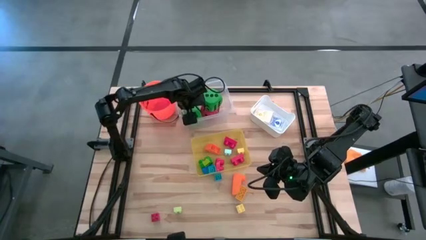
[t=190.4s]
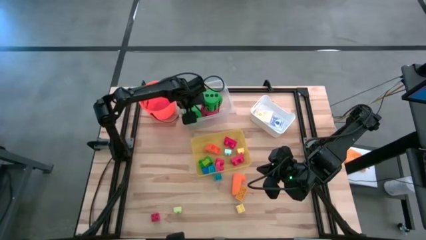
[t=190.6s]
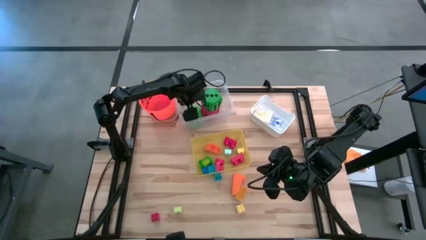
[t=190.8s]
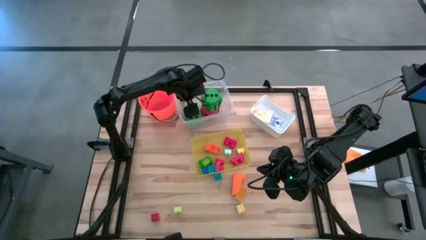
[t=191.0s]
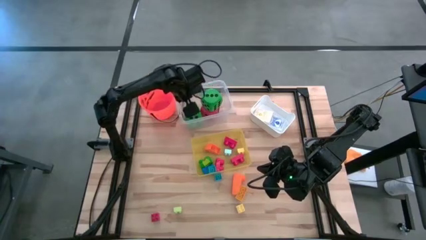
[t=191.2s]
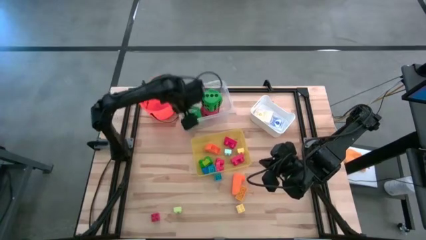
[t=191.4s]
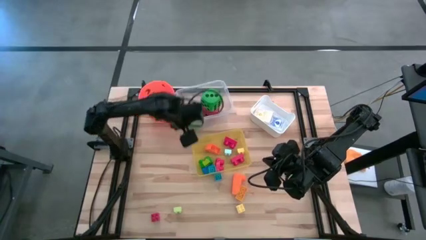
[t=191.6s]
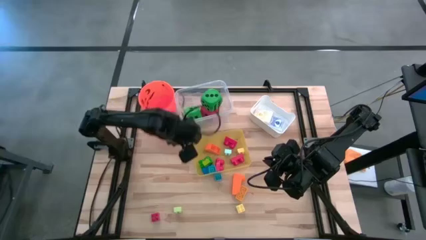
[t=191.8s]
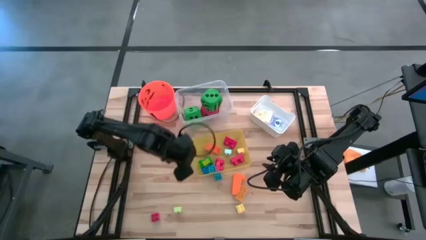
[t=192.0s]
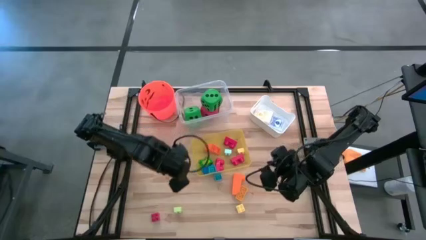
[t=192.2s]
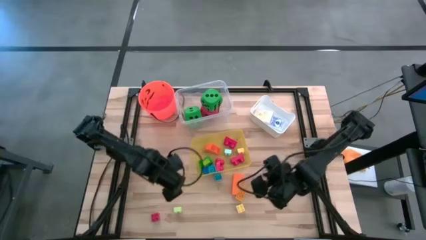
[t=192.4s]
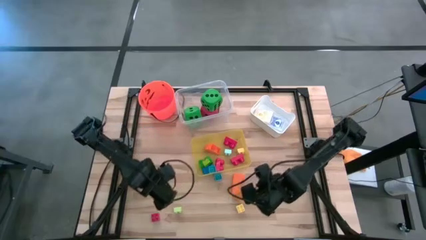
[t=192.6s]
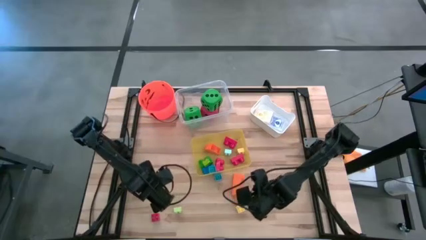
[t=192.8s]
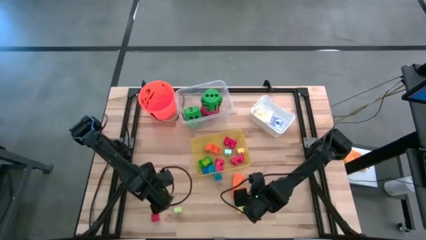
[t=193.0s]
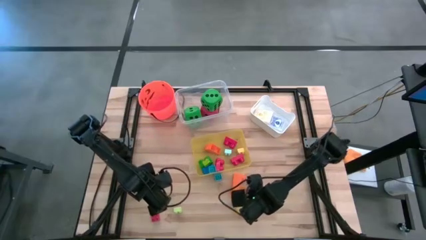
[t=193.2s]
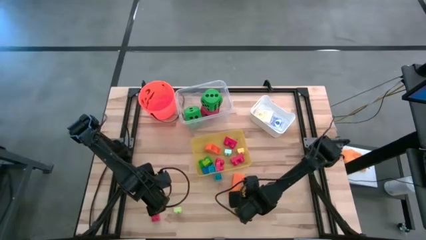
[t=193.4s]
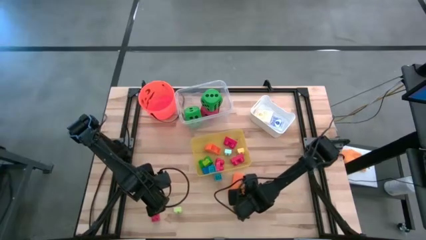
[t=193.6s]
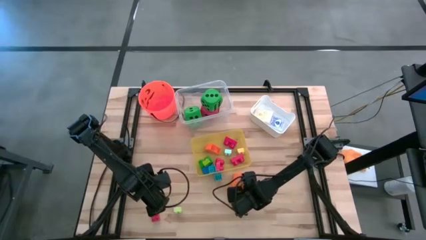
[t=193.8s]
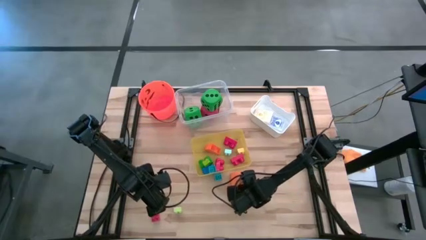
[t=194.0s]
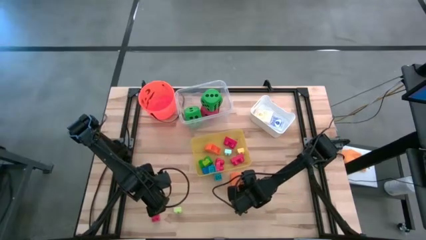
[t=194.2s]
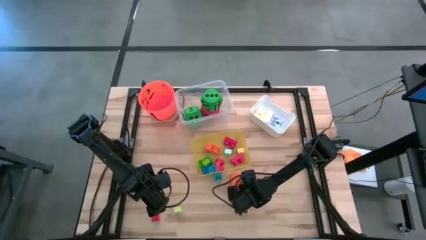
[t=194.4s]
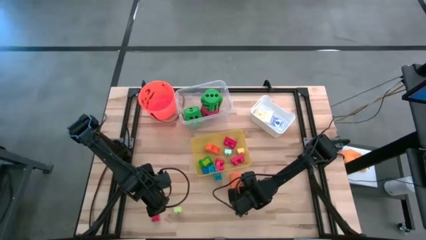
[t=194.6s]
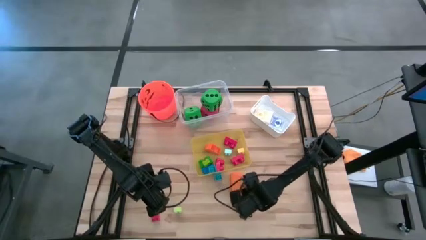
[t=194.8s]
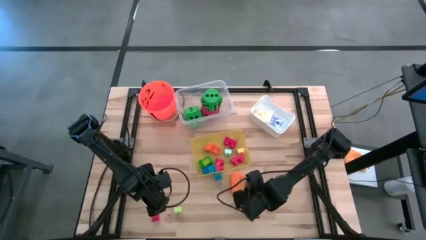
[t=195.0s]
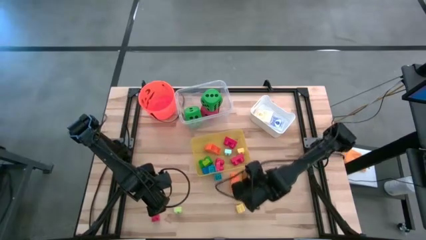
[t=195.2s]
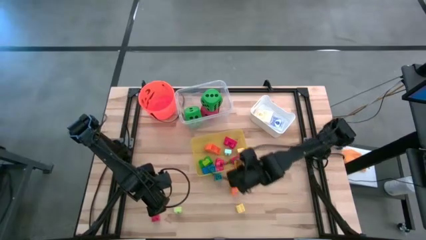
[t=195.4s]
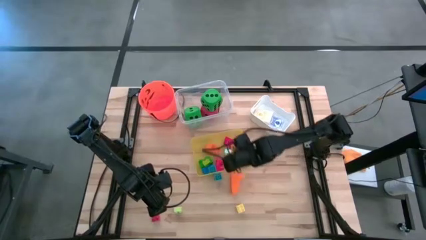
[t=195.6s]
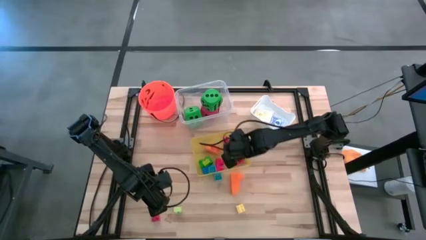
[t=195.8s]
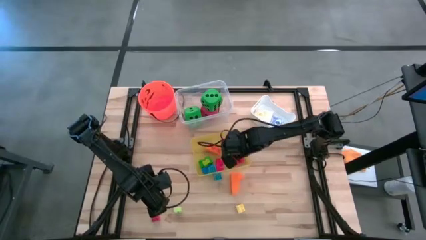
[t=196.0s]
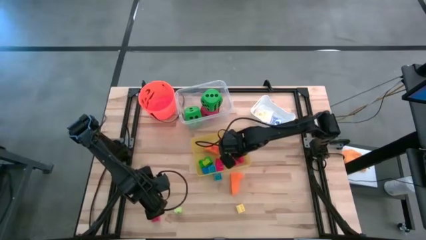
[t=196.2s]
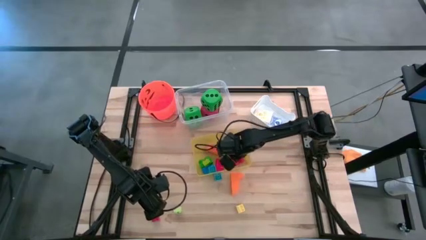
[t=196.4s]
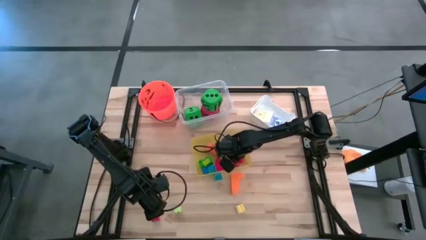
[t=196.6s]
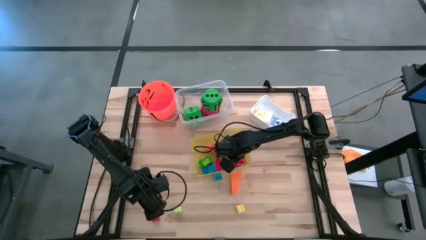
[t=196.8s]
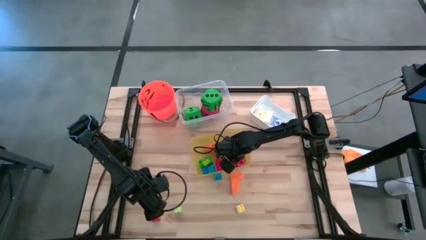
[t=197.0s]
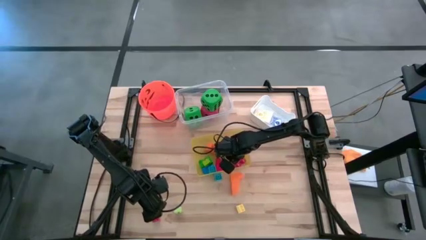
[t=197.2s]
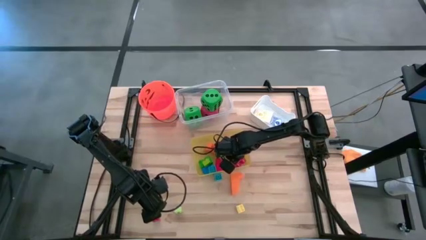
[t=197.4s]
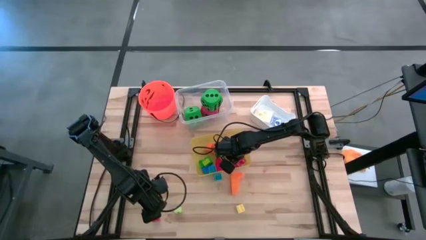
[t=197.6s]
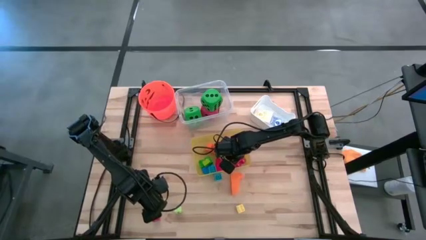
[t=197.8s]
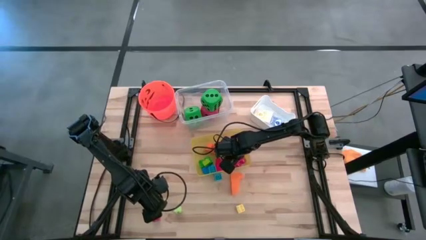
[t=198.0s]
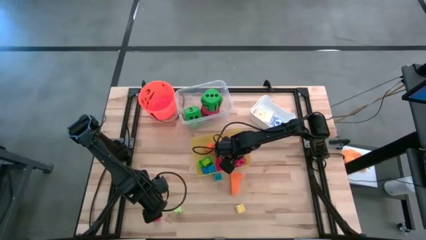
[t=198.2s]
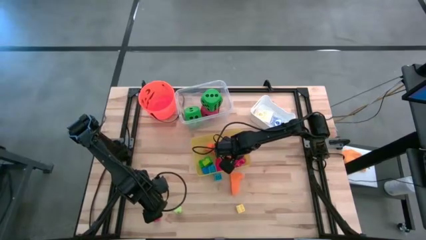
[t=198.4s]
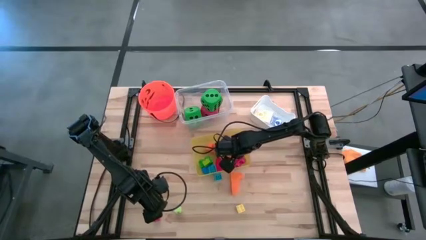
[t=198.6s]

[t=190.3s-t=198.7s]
Task: Pick & Place Toys
Put the yellow game piece into the yellow bin

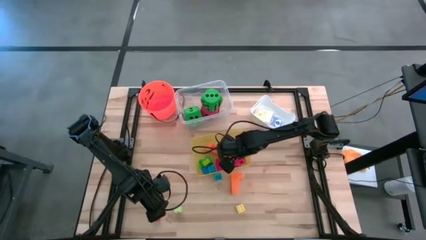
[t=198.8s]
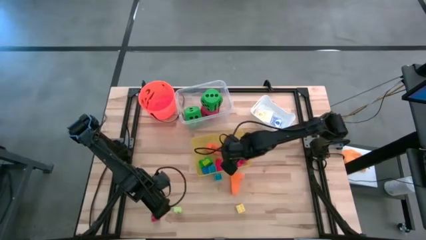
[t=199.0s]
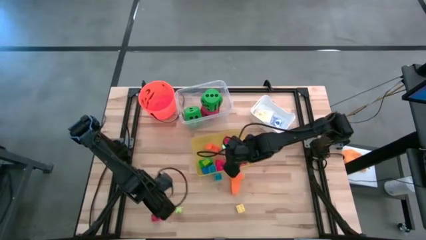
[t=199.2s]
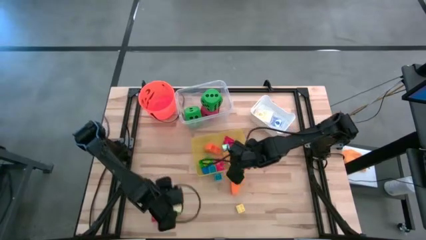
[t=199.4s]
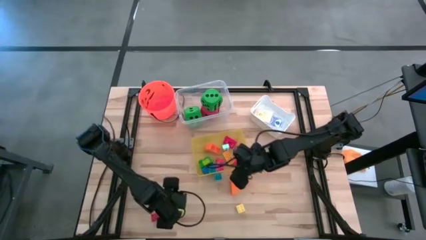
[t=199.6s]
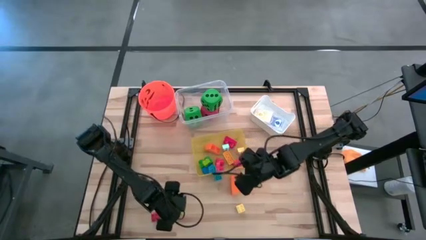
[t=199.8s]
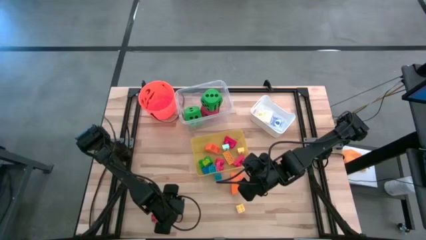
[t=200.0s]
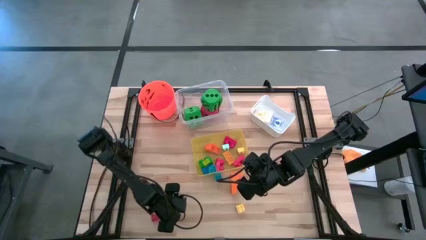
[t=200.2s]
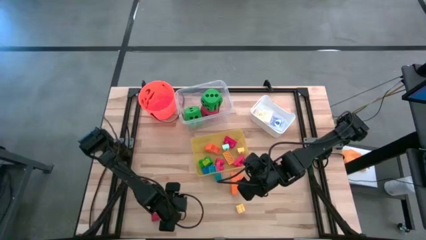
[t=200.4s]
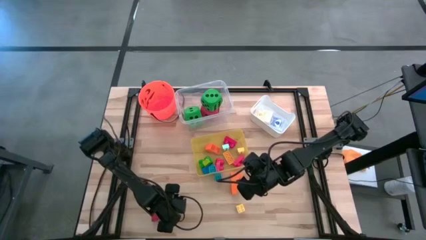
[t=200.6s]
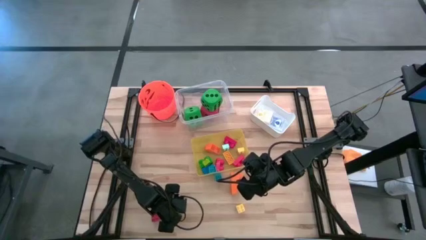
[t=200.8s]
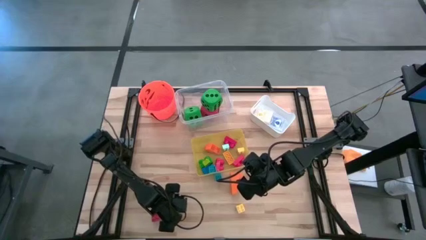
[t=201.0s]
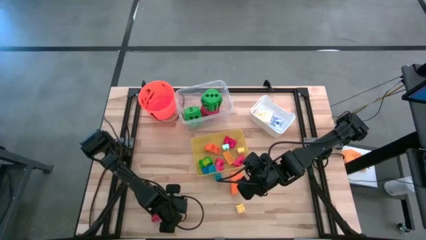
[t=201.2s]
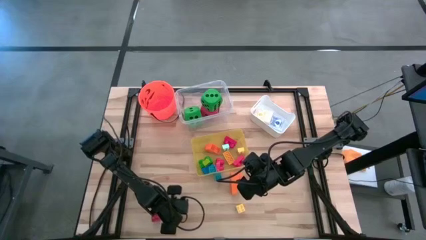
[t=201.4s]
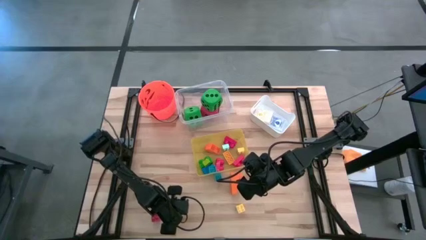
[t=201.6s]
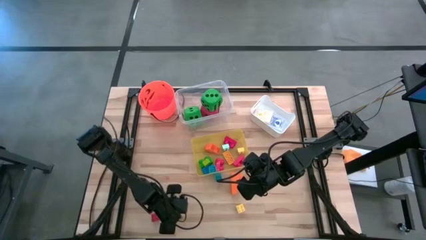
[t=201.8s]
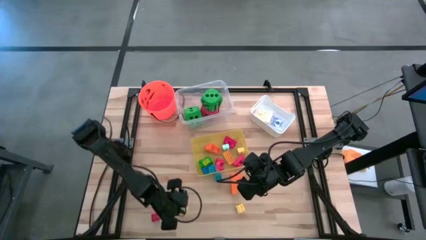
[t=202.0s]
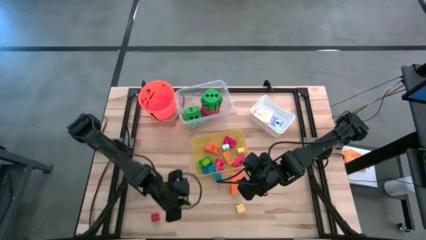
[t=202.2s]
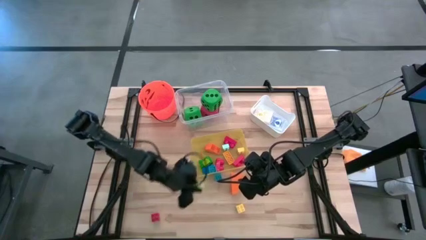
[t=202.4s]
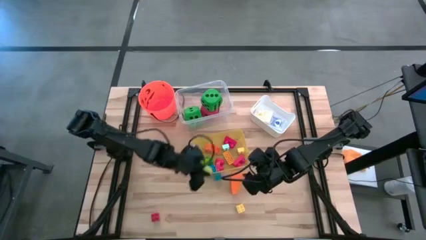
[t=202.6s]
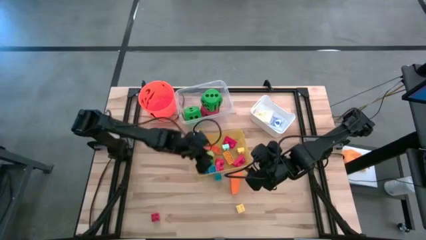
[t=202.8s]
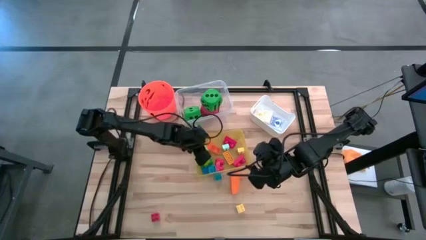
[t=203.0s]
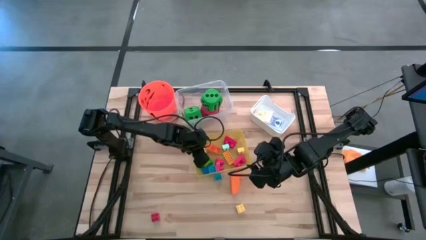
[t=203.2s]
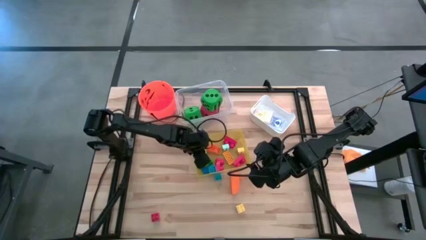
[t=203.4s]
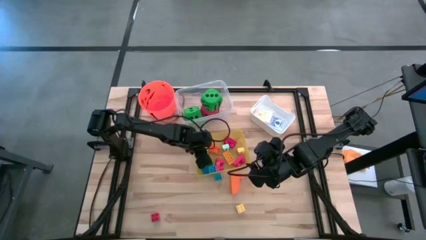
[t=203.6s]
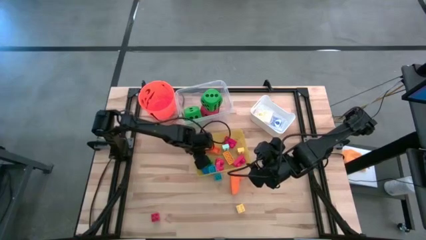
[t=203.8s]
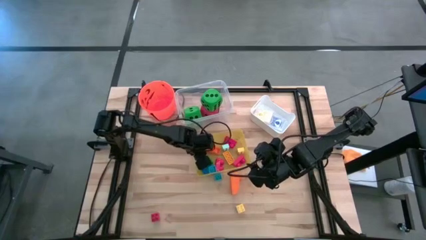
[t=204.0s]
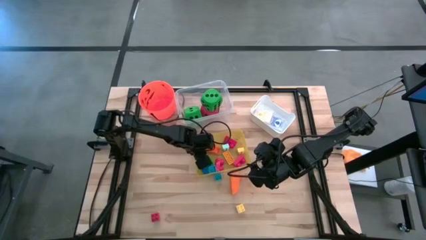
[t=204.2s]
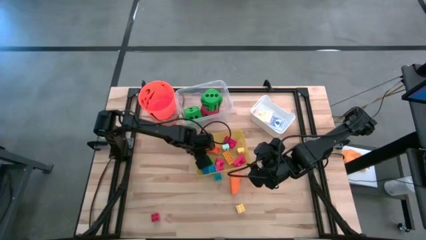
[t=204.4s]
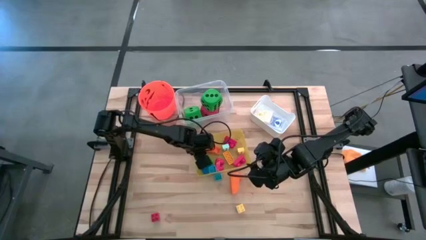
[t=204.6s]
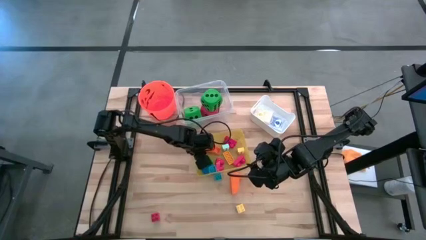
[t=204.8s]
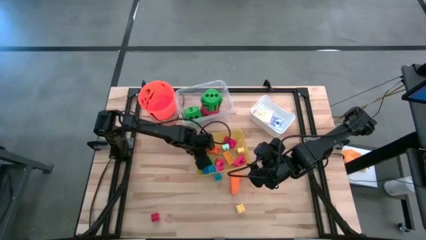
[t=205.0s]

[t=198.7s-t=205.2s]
Put the light green game piece into the yellow bin
